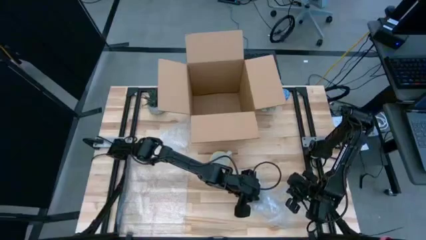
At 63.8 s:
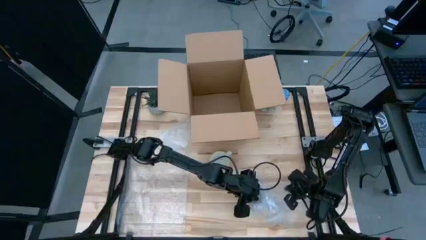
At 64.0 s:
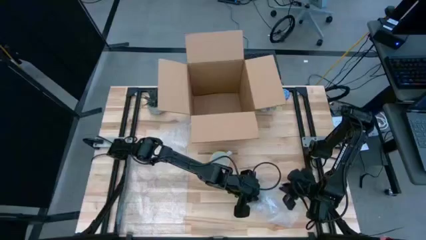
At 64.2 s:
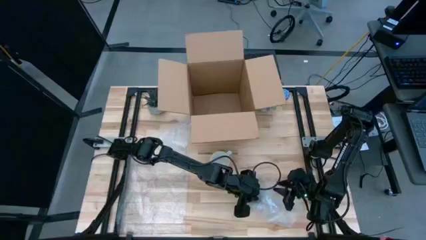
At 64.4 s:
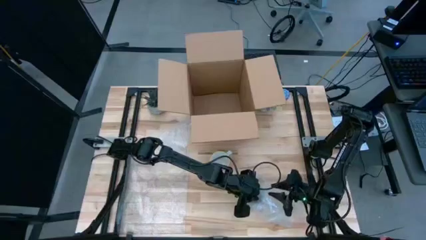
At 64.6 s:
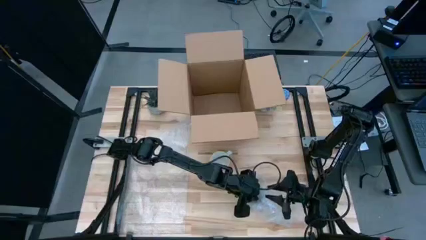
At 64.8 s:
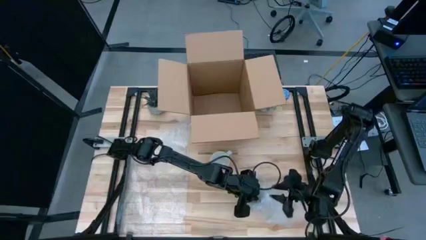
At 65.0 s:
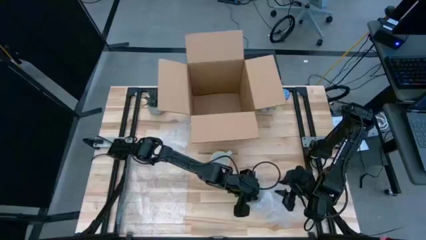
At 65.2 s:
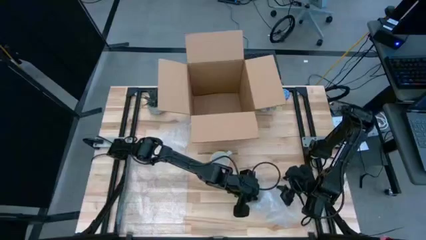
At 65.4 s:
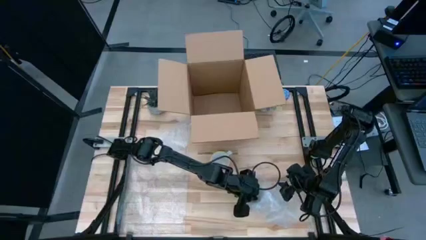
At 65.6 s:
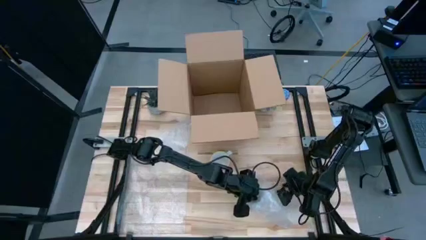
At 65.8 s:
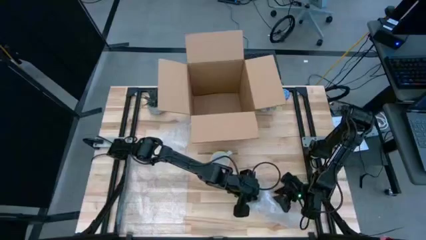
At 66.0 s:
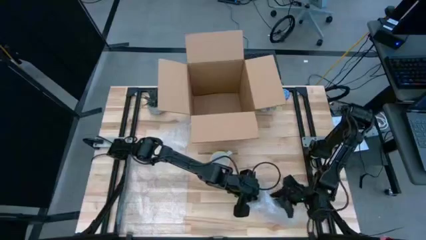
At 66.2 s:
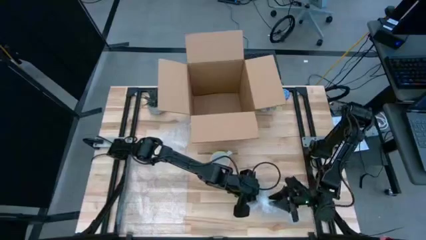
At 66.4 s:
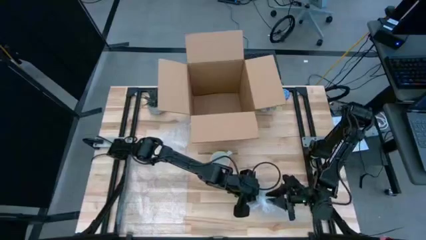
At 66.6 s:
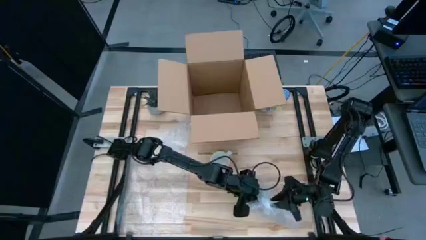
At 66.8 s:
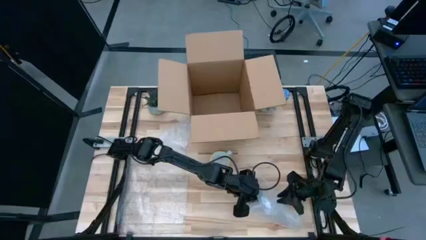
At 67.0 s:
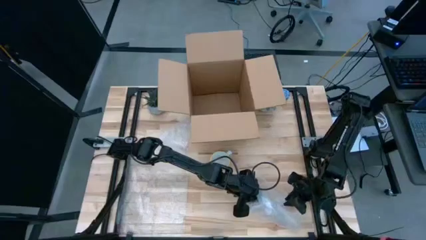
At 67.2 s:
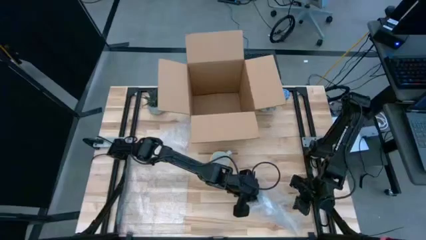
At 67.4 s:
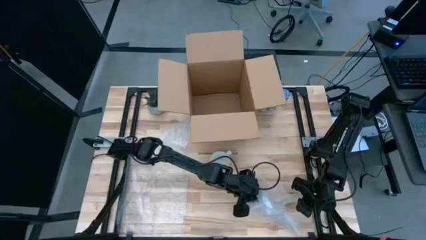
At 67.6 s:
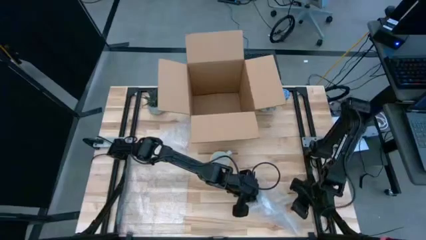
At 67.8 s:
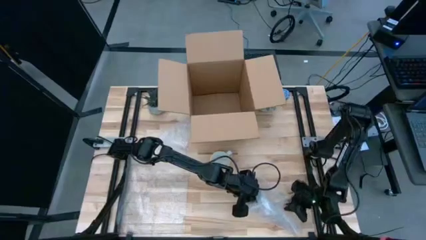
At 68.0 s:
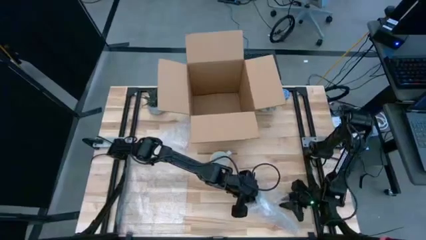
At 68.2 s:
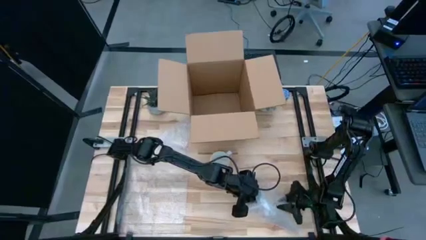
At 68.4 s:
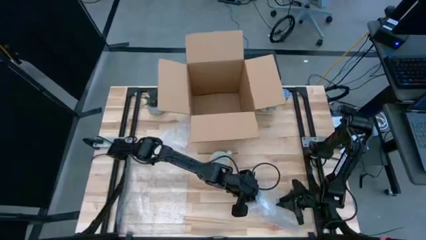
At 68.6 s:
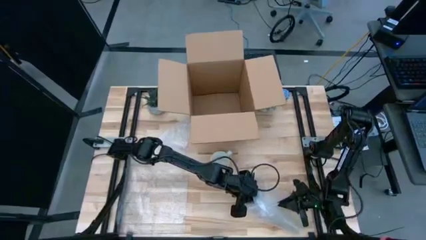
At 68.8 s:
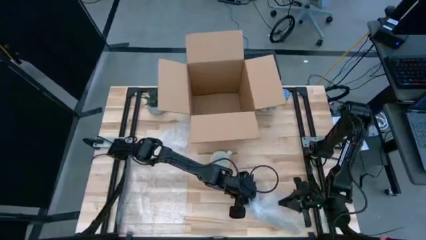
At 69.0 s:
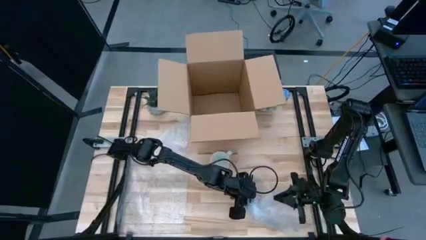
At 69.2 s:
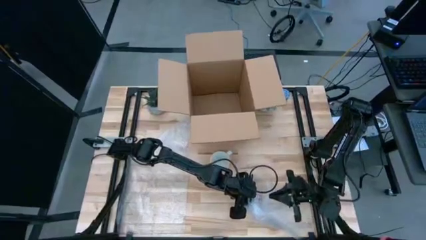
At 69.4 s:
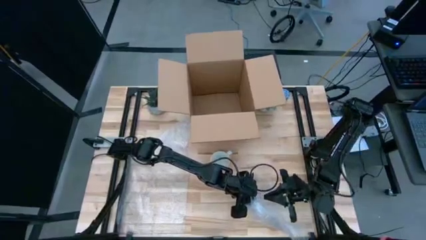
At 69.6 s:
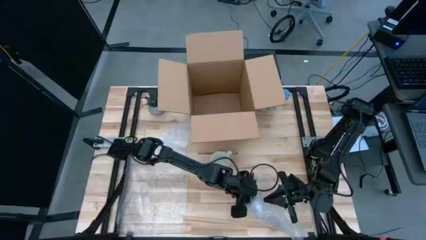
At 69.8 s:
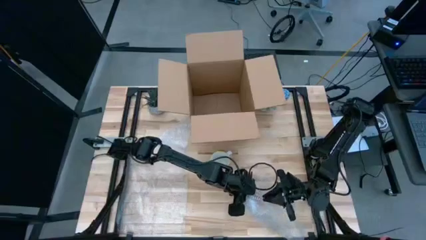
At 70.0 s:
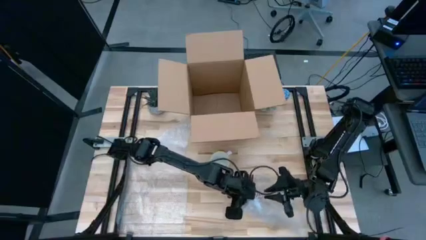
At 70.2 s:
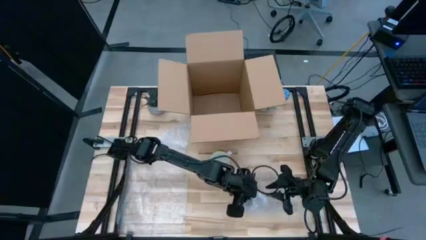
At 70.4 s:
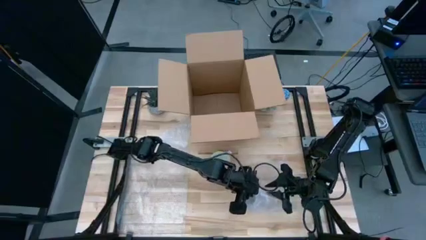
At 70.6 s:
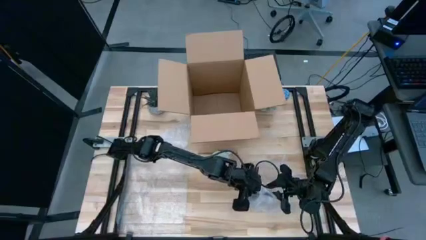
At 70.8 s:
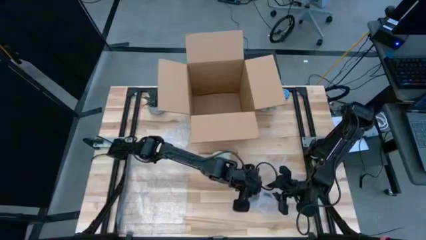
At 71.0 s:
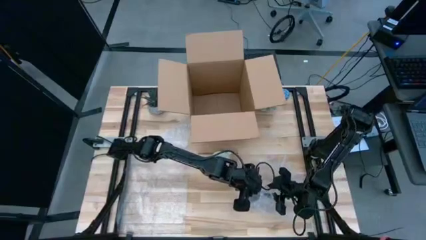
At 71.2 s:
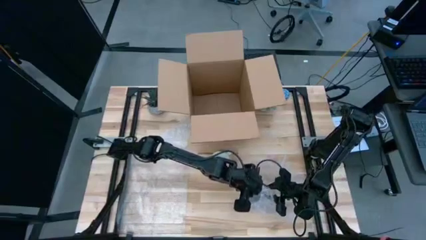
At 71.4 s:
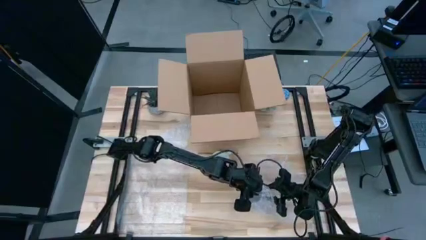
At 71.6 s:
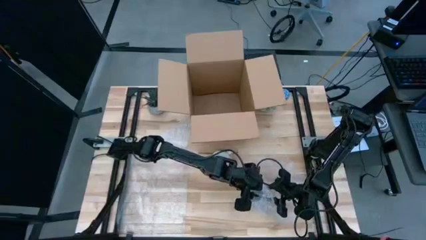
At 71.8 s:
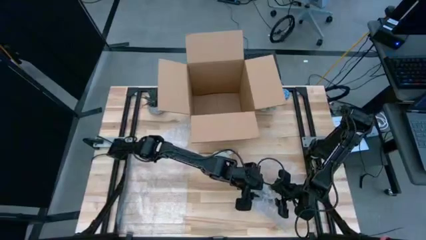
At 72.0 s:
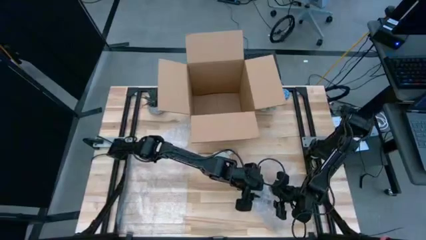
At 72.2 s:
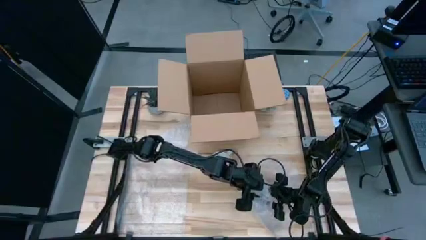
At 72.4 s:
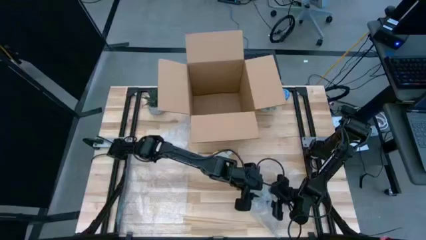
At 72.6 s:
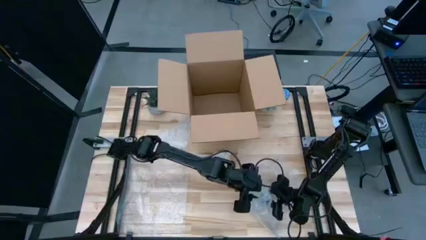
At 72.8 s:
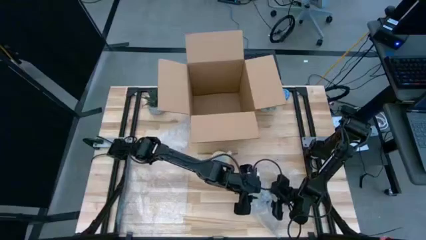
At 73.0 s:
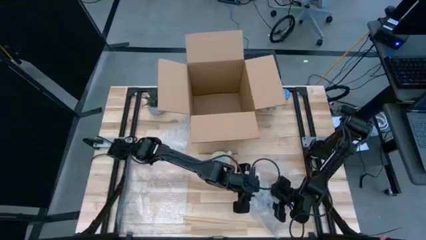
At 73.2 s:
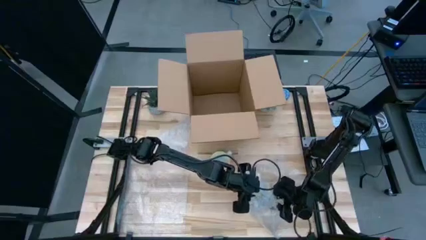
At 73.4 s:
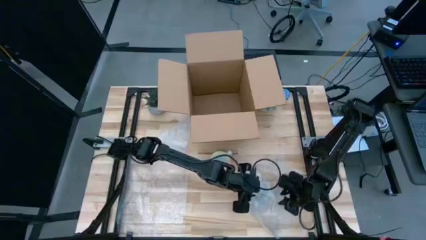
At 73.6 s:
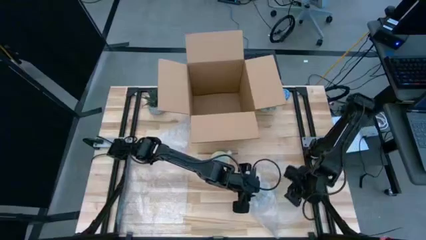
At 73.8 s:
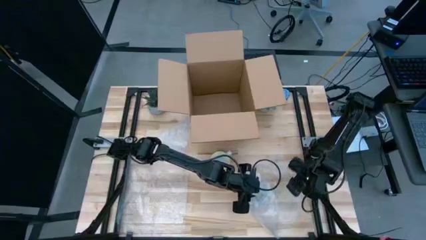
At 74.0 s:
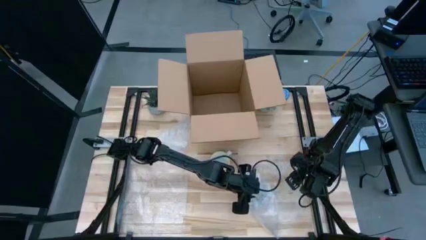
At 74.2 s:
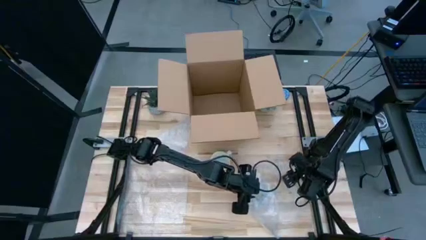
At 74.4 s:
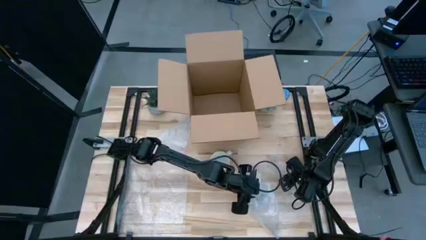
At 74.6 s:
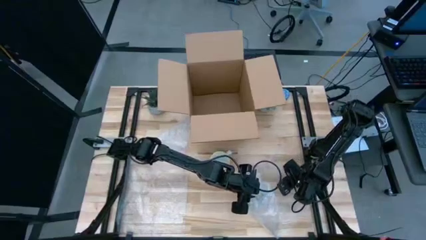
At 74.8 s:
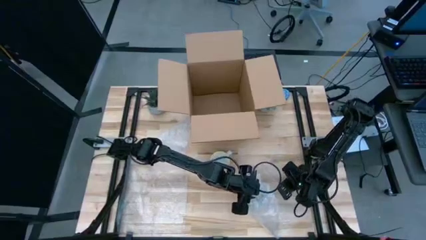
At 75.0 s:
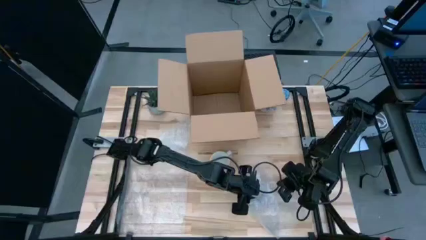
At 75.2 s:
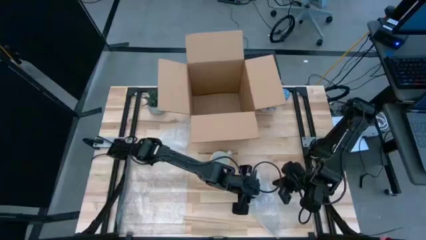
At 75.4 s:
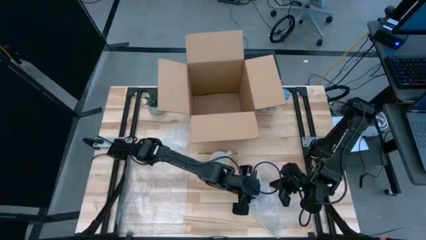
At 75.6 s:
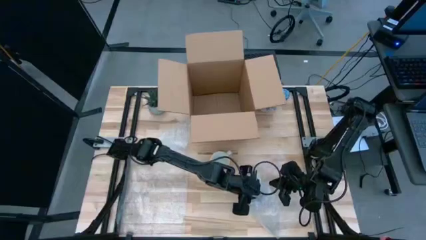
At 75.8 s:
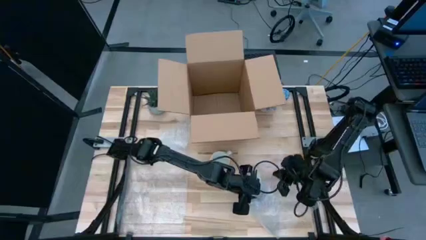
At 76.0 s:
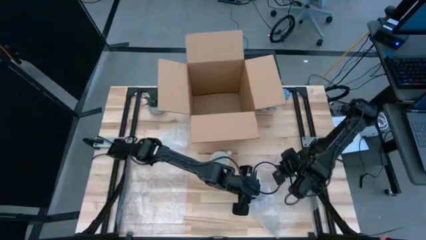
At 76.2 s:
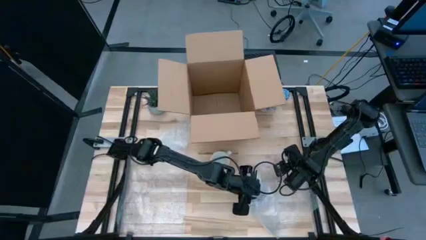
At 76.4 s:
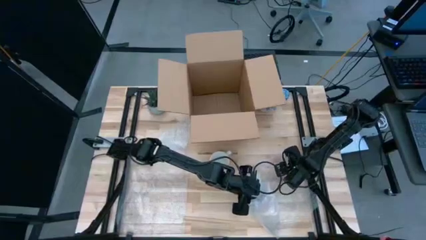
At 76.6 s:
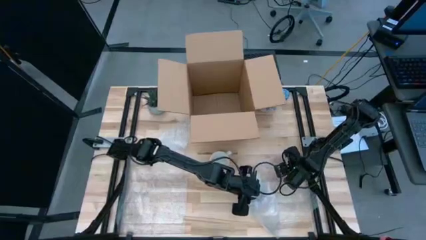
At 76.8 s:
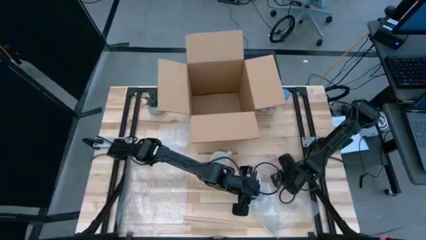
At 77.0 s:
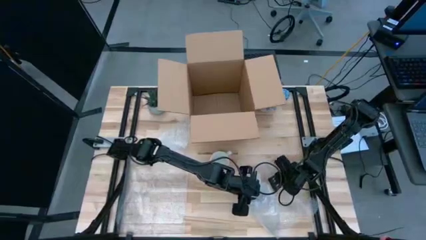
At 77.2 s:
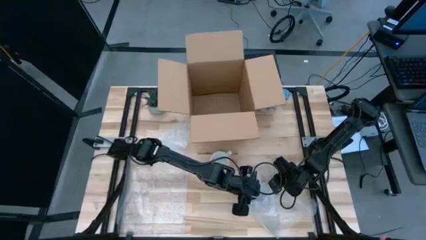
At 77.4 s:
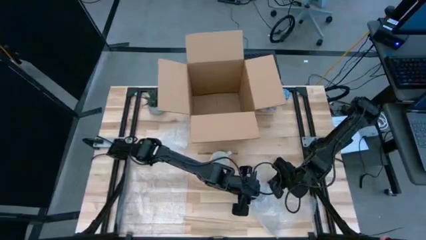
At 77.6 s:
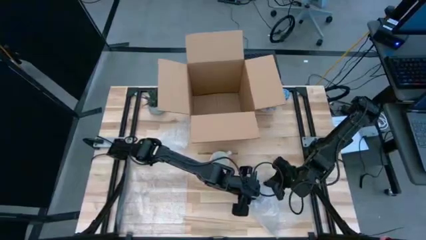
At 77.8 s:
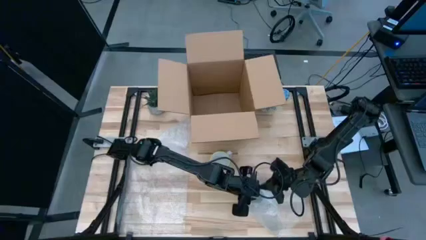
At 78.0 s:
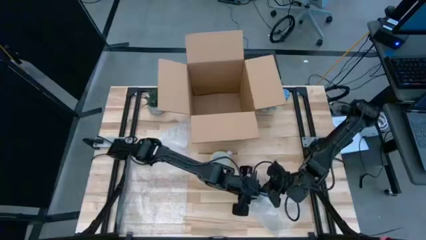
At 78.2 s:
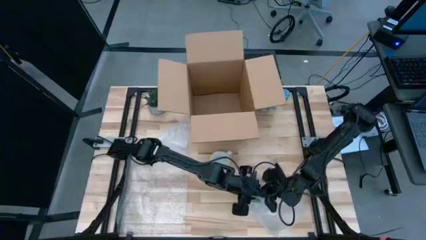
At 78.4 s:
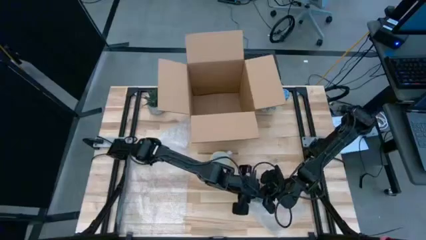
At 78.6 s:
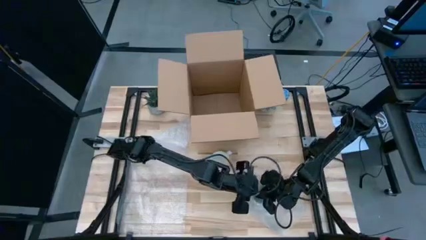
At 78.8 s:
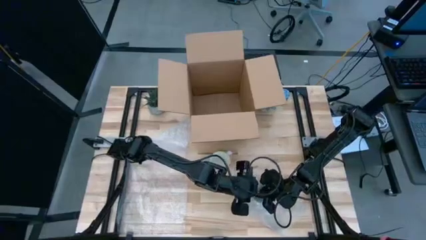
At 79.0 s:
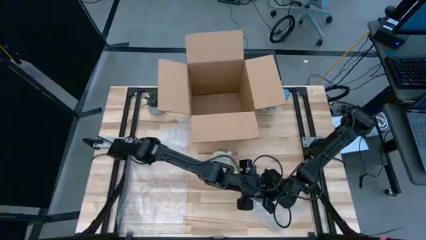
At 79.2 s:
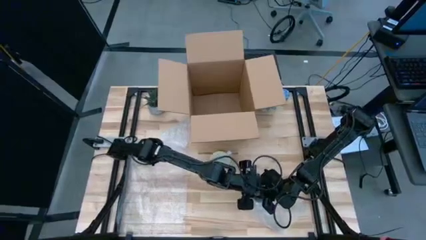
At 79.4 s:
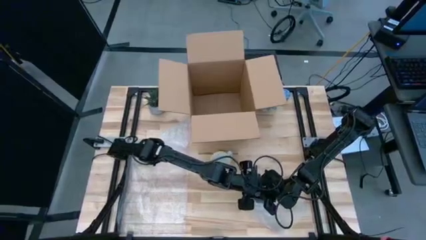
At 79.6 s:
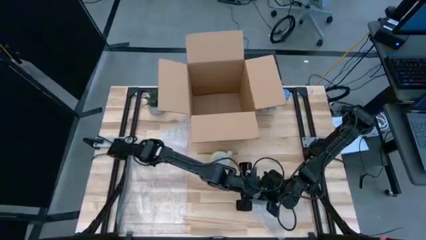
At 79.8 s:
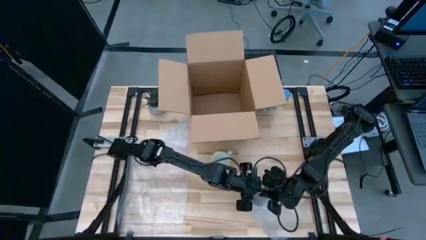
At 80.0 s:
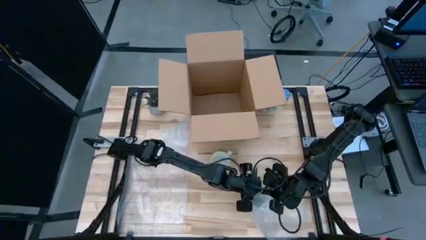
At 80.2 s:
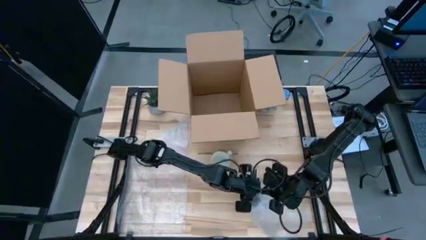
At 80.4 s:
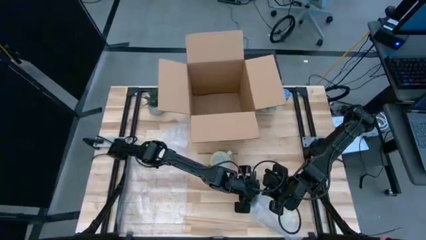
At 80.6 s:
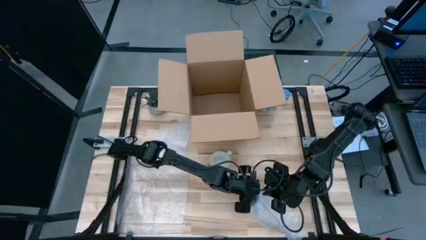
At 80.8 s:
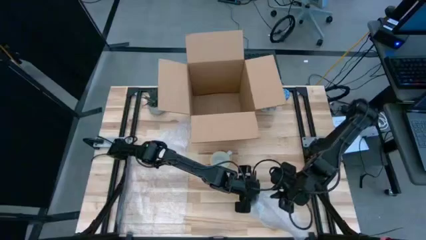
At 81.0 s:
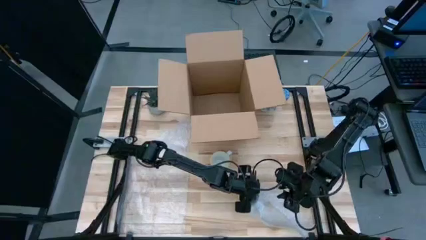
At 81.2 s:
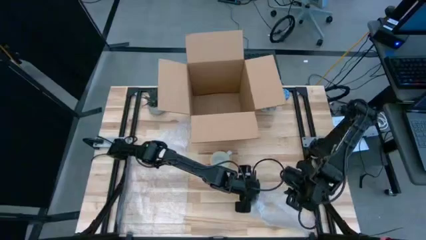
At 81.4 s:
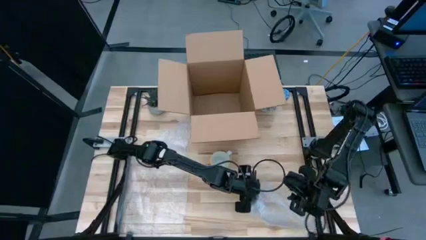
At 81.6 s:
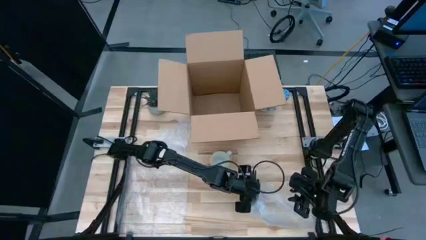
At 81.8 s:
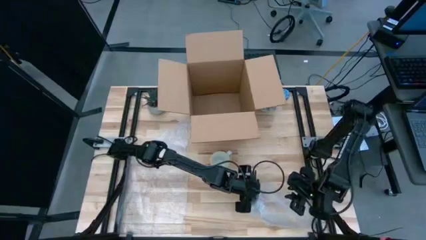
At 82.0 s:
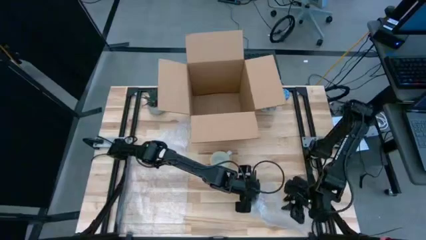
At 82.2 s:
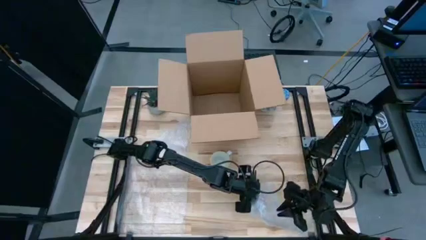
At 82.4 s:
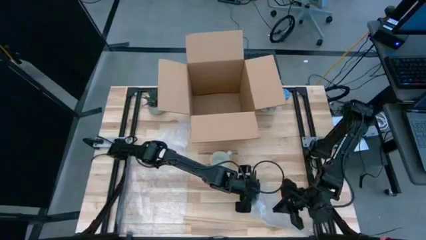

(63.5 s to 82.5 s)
Task: wrap mug
Wrap the red mug with bubble wrap
